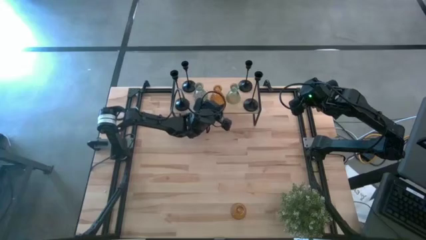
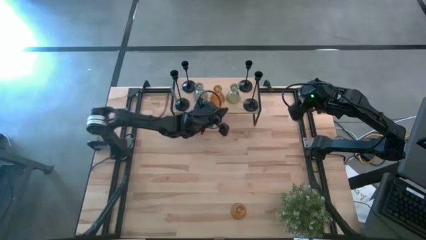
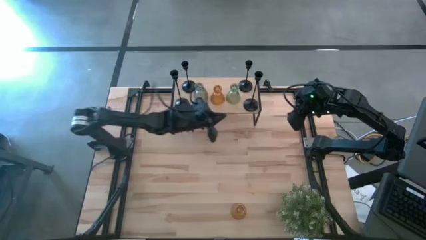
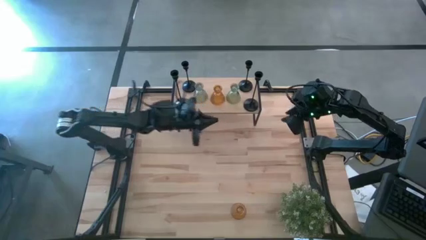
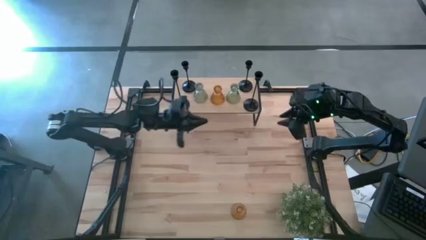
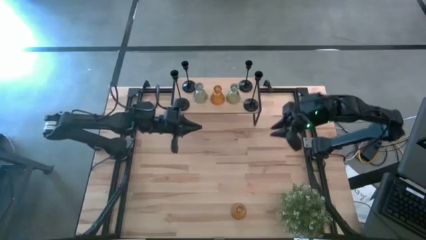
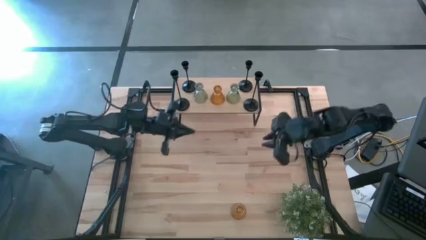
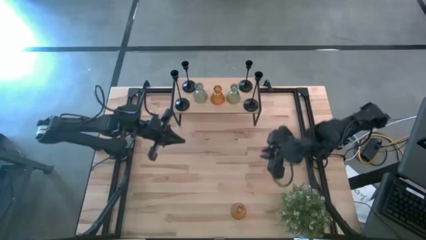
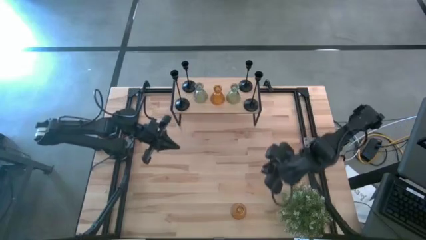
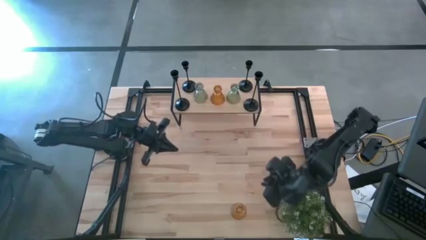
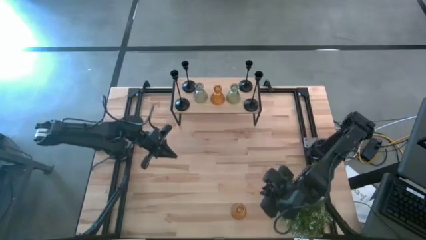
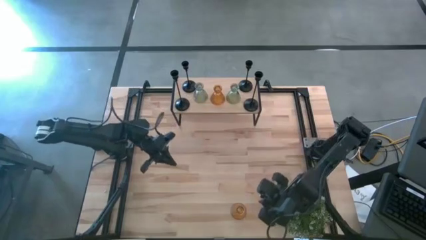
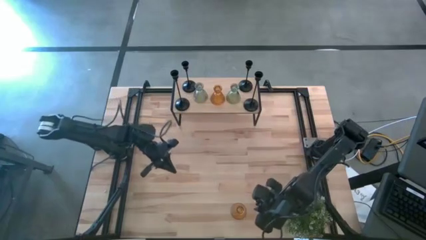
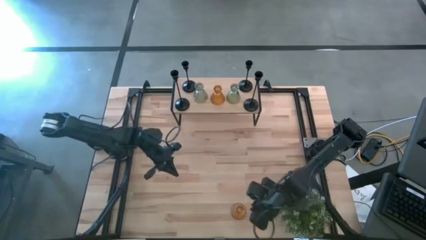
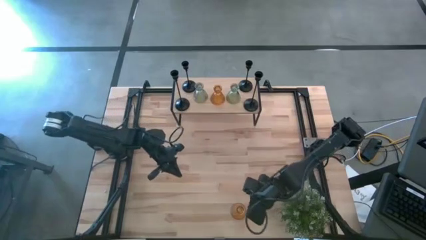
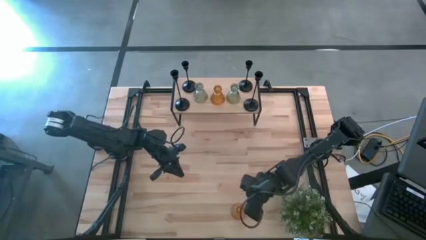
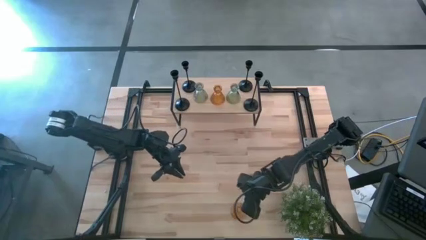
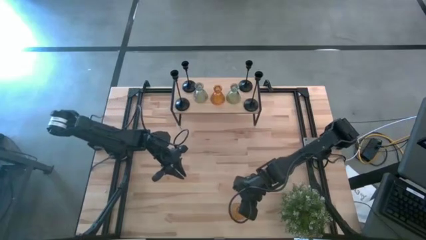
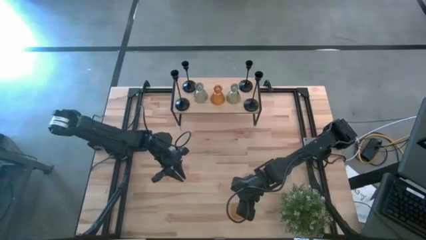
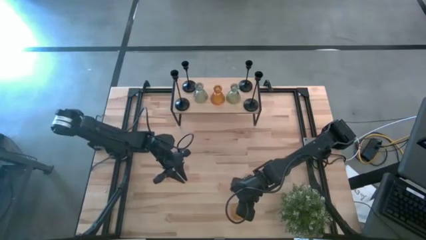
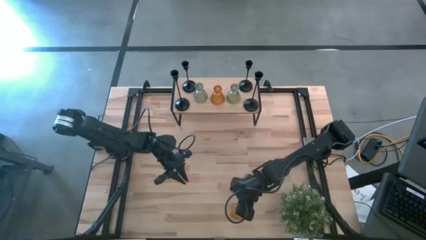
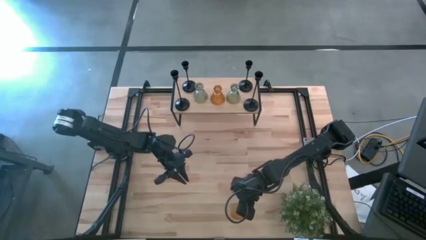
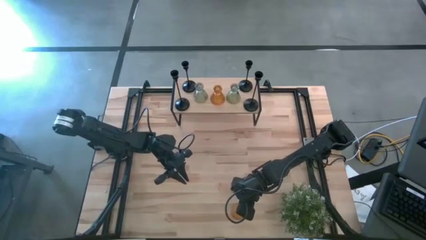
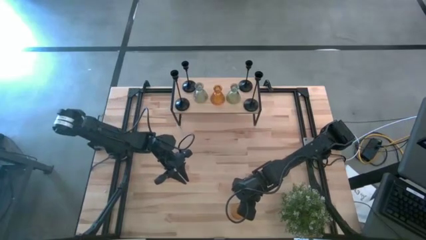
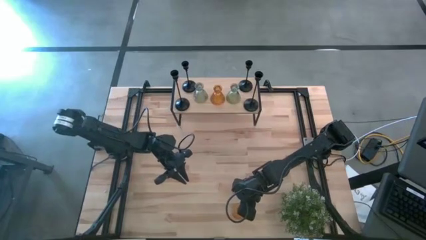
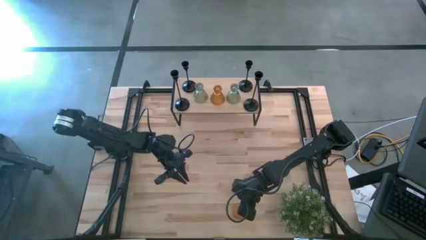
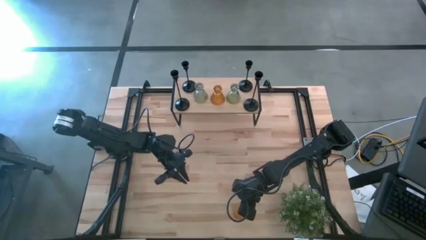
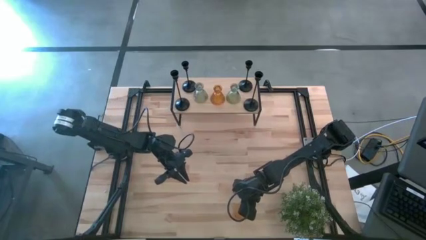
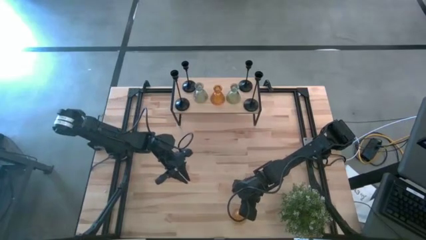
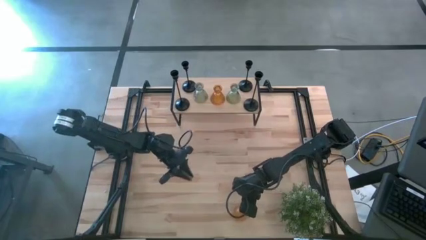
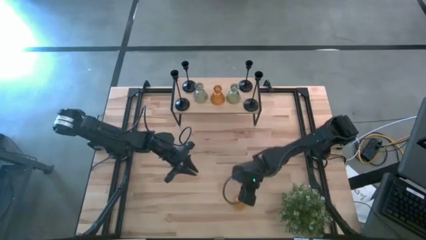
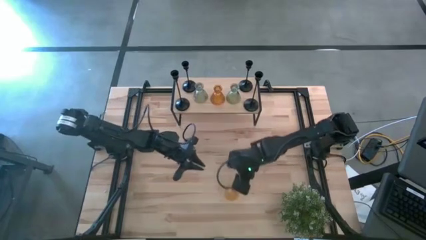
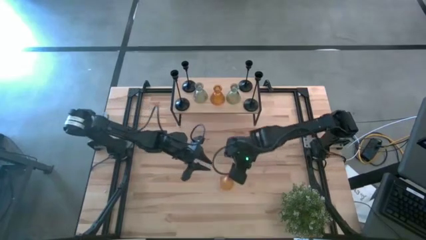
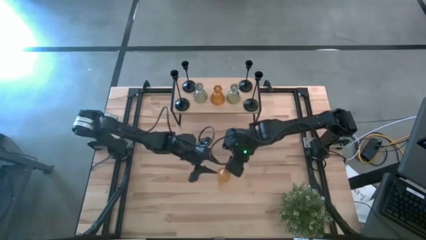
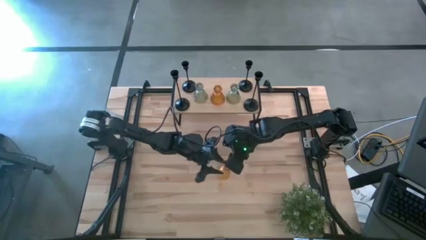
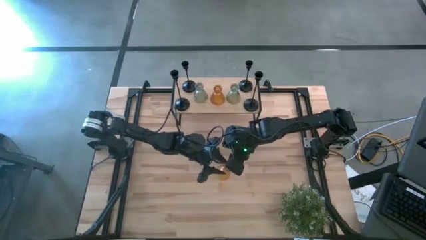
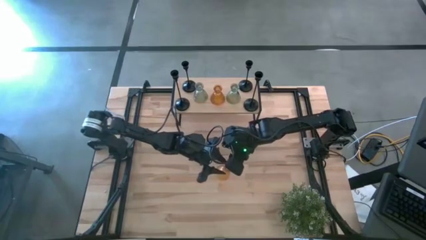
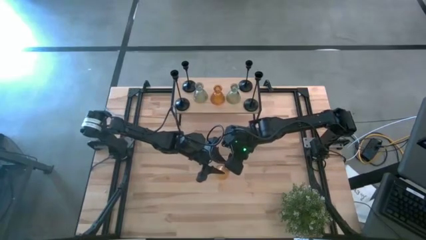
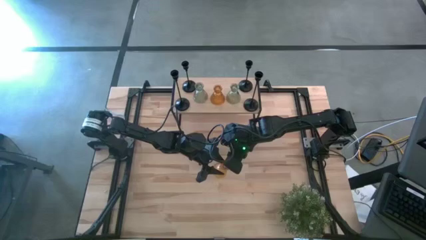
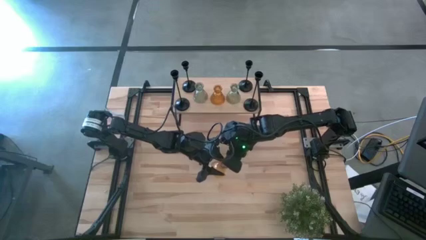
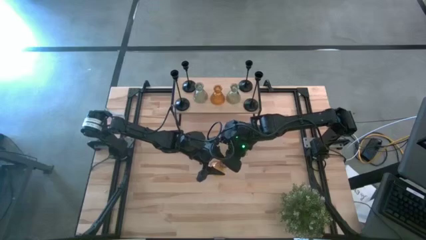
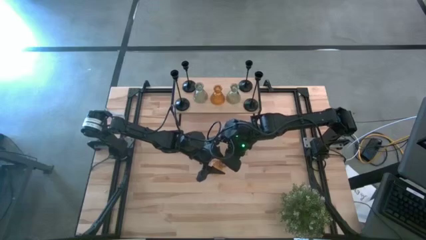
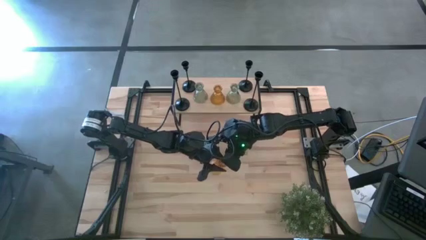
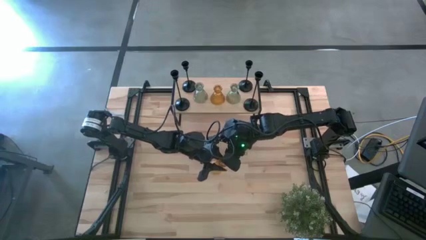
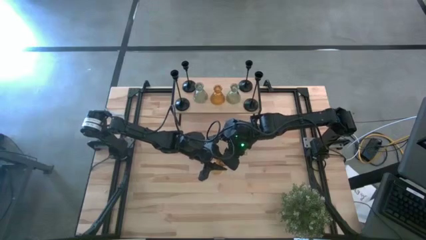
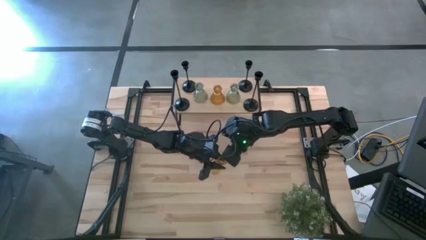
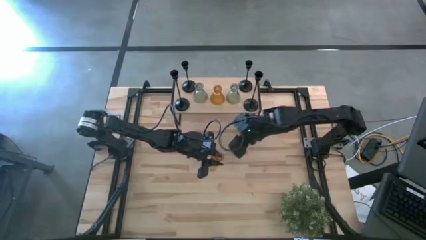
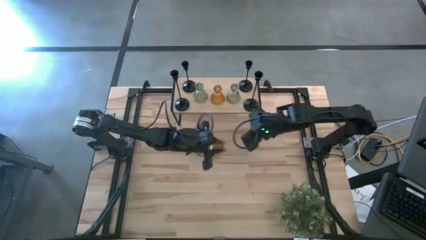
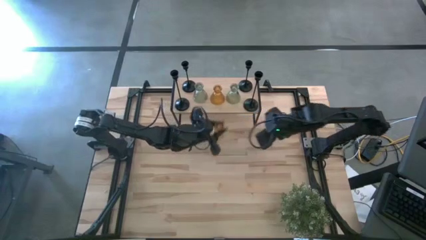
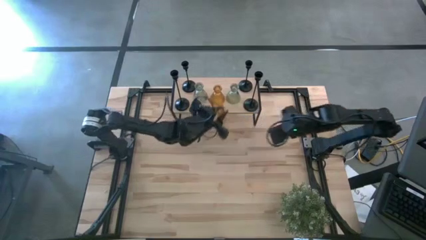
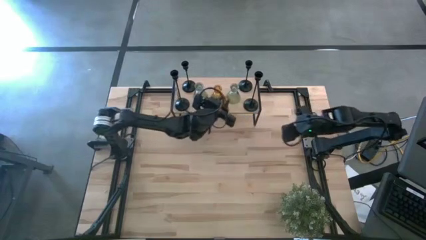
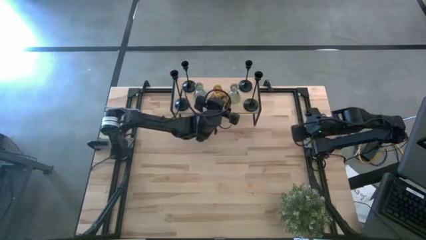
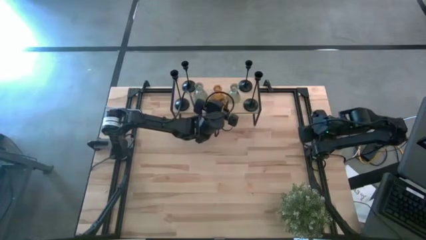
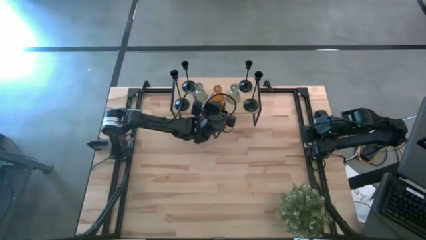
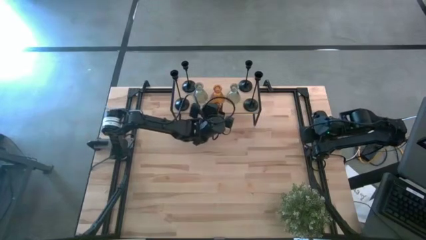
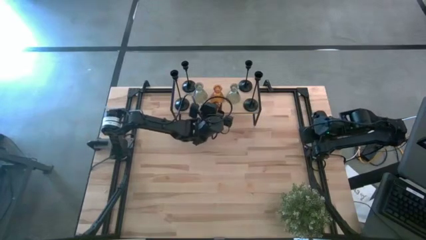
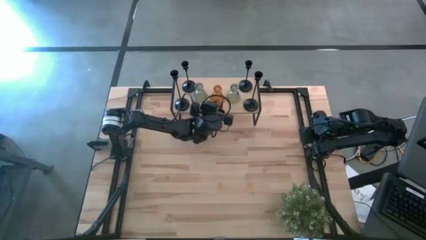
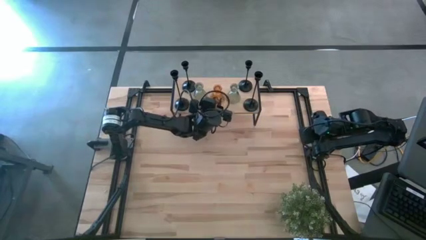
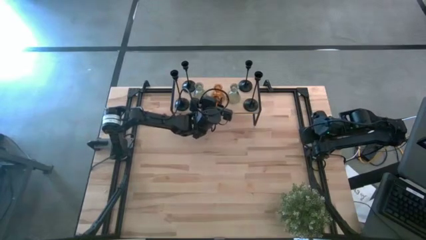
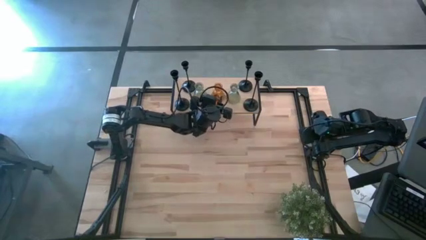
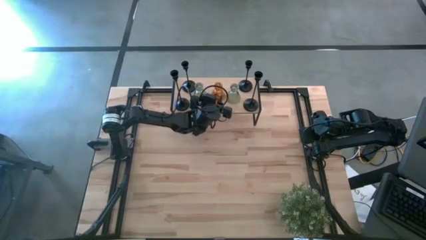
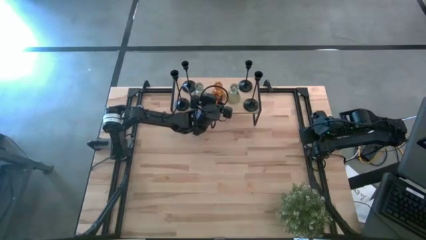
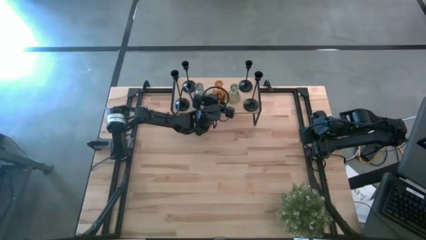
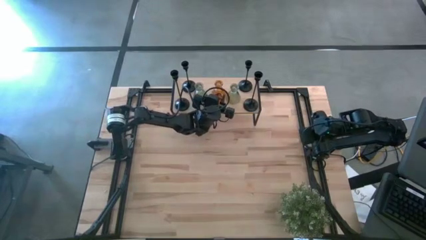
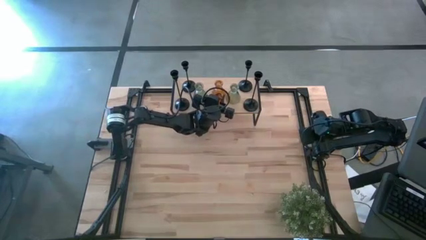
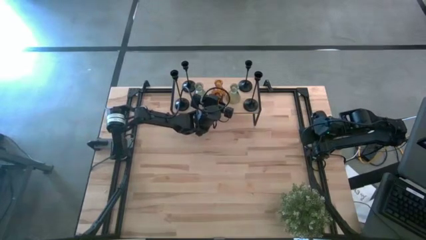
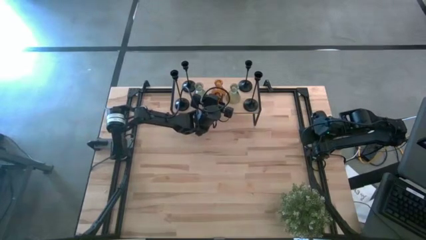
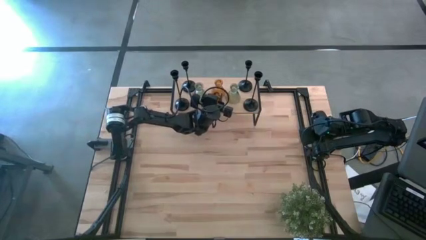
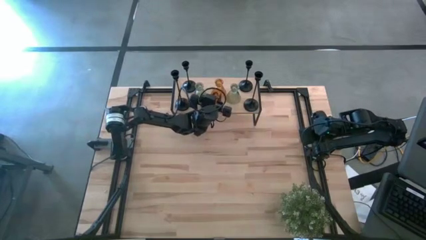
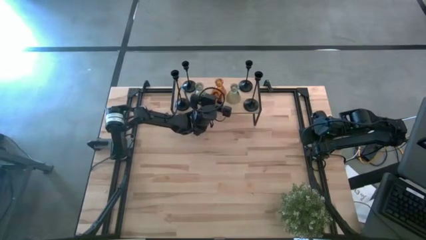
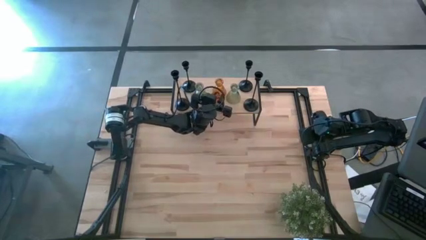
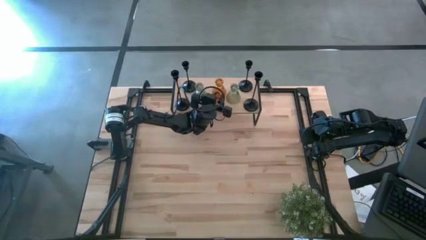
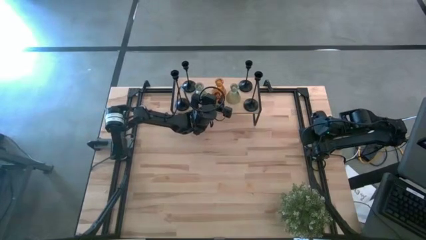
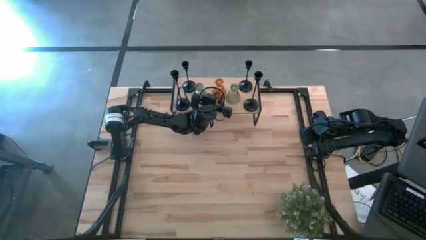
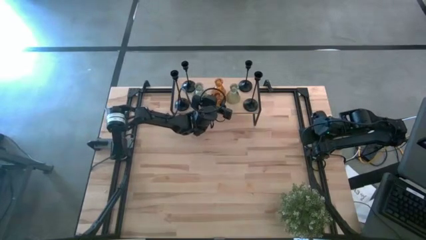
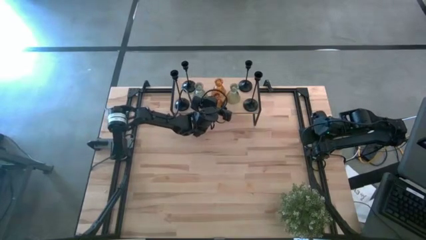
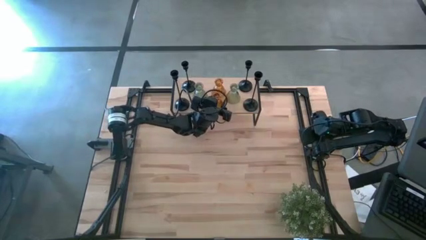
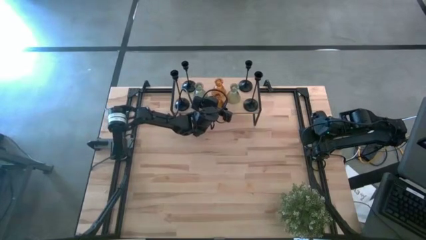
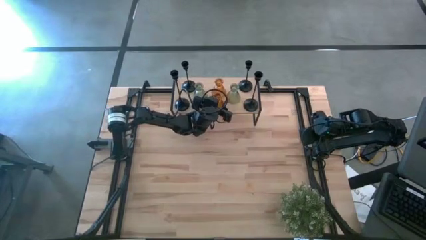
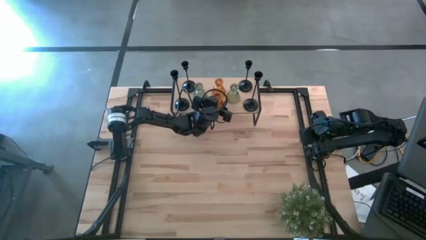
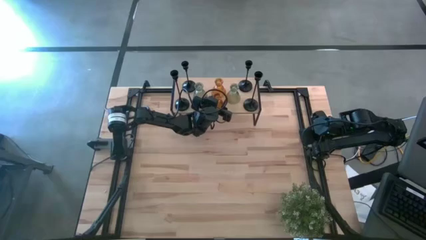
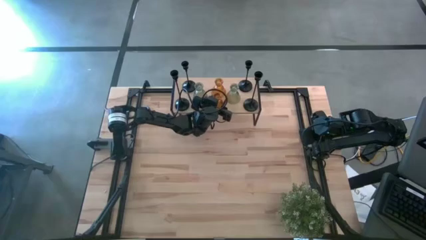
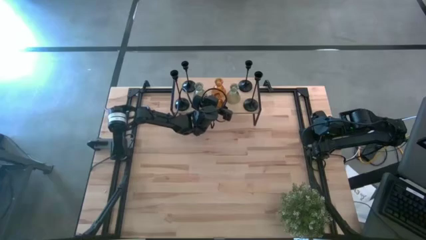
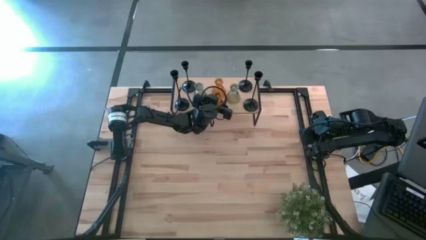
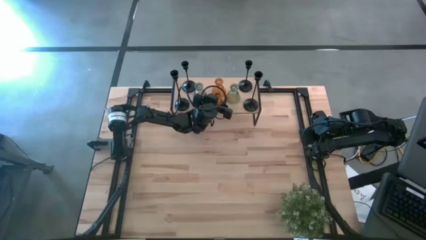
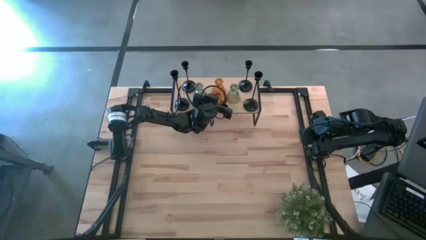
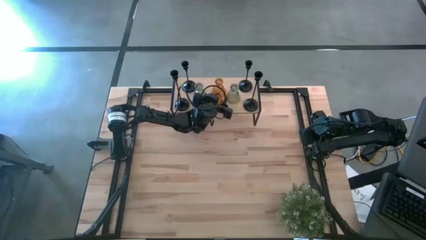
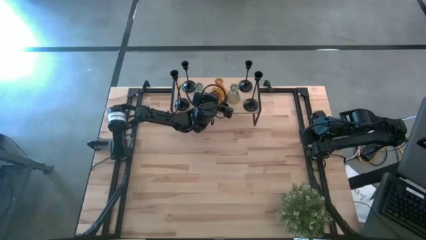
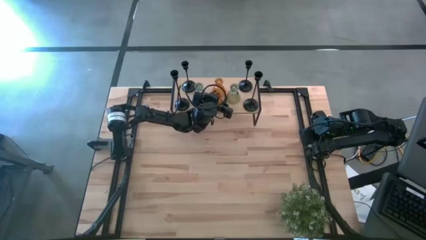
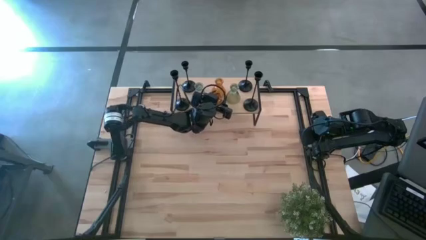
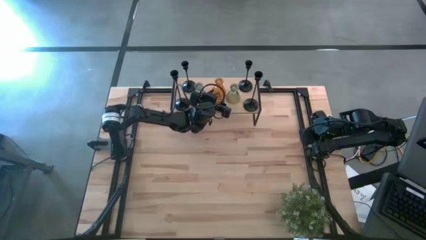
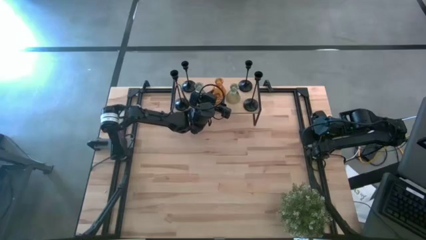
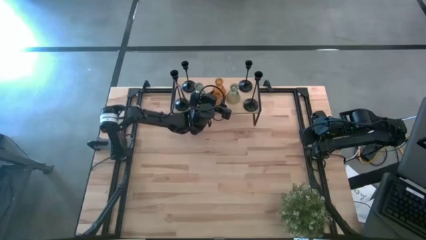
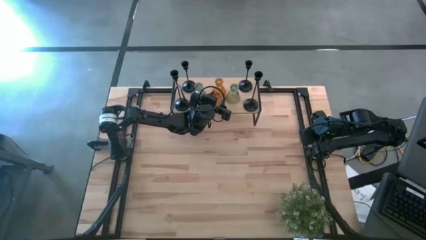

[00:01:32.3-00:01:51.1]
Task: Pick & Place candle stick holders
Put the orange glass candle holder on the shelf
